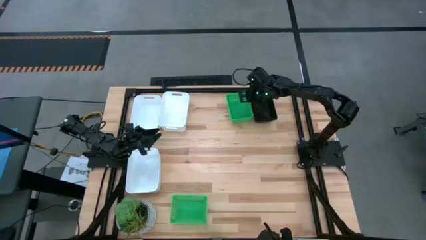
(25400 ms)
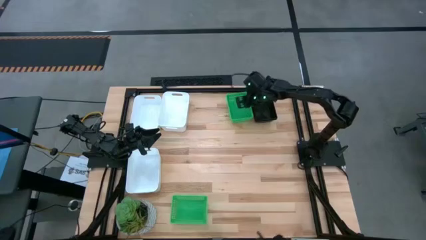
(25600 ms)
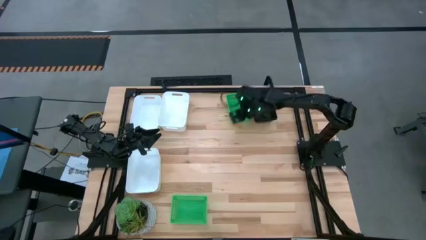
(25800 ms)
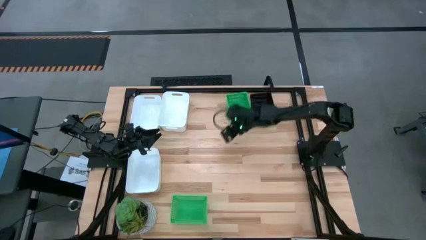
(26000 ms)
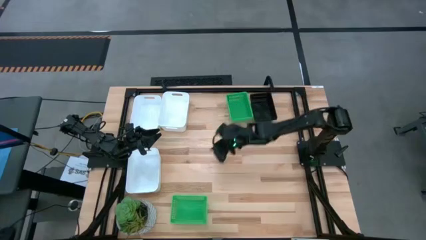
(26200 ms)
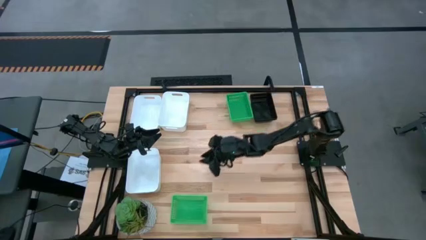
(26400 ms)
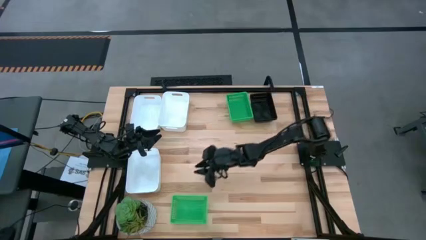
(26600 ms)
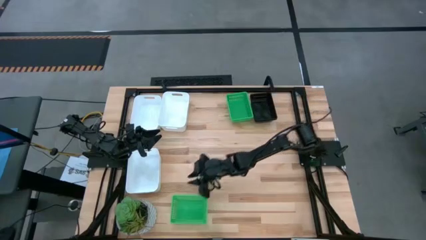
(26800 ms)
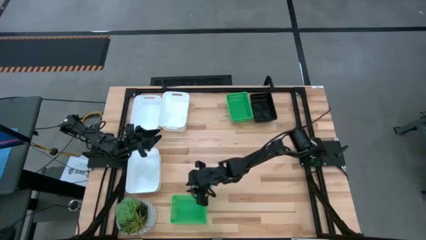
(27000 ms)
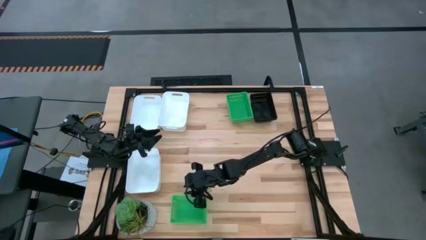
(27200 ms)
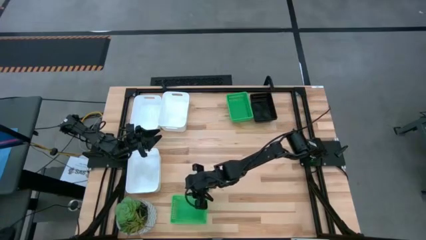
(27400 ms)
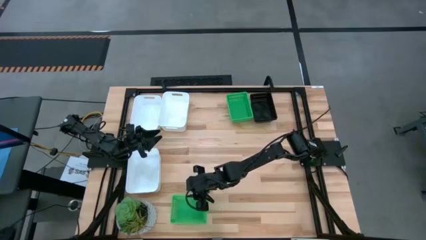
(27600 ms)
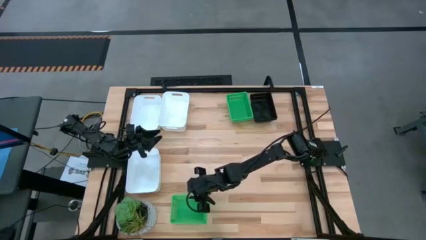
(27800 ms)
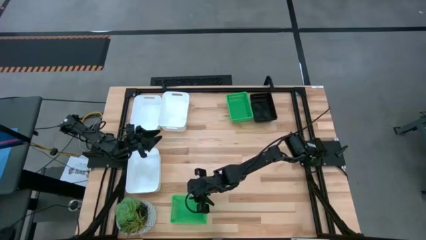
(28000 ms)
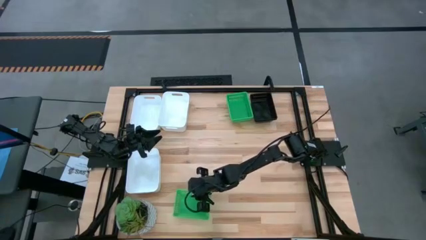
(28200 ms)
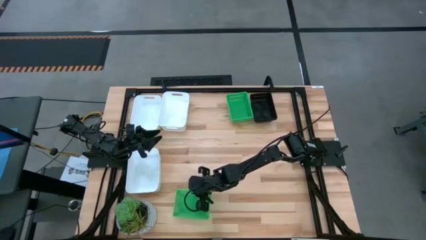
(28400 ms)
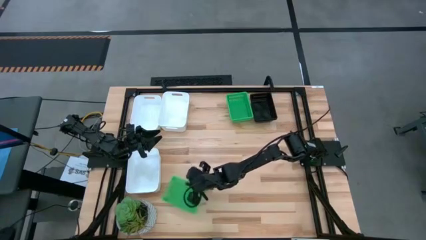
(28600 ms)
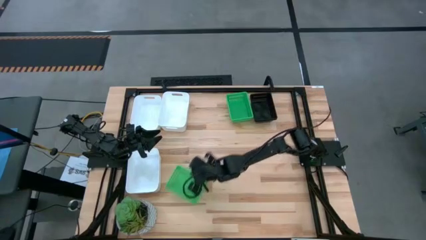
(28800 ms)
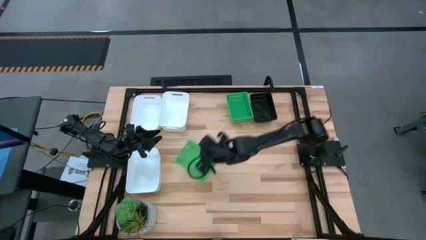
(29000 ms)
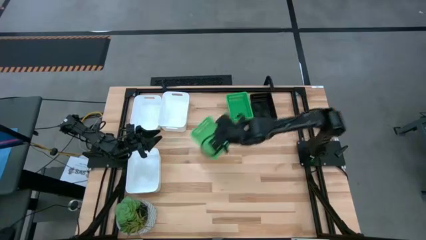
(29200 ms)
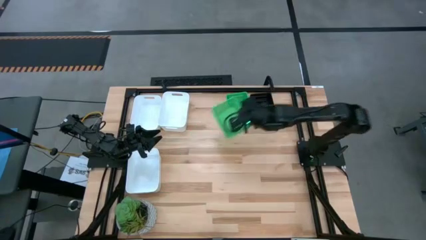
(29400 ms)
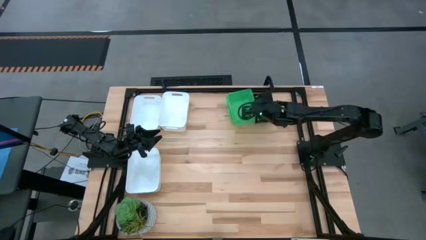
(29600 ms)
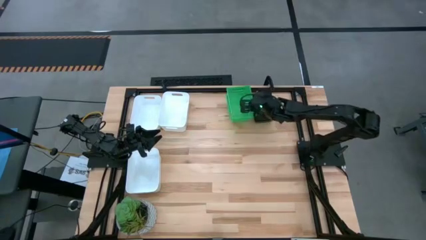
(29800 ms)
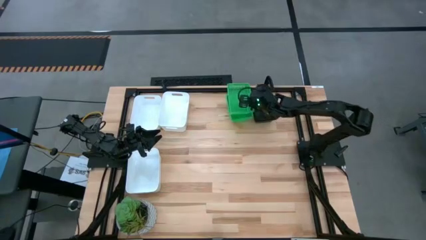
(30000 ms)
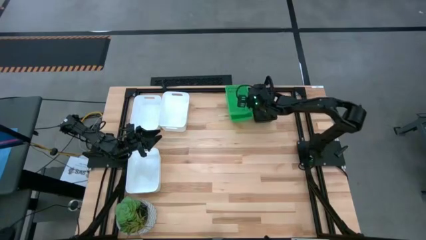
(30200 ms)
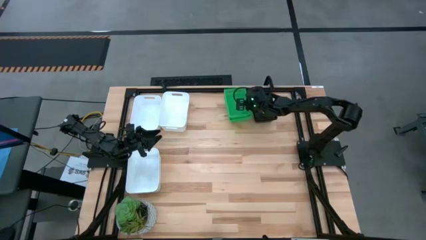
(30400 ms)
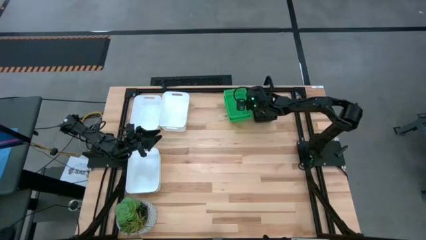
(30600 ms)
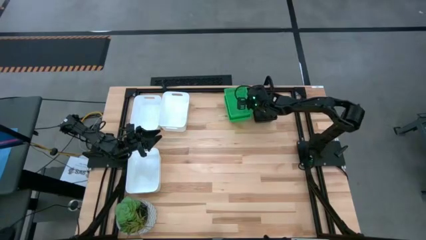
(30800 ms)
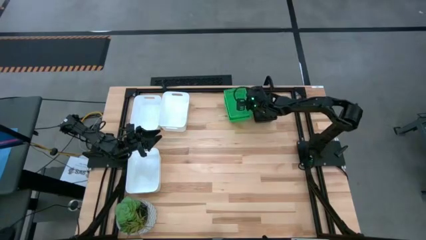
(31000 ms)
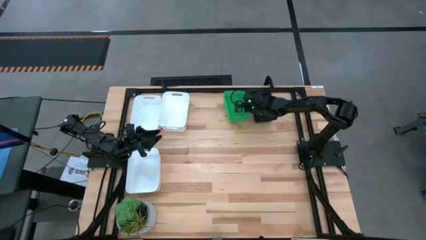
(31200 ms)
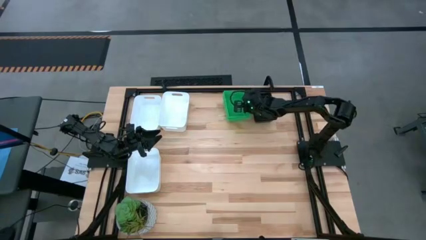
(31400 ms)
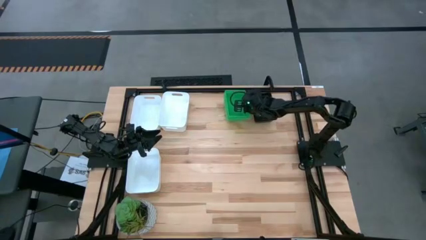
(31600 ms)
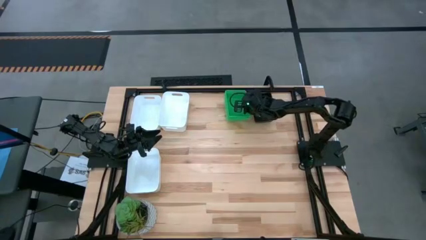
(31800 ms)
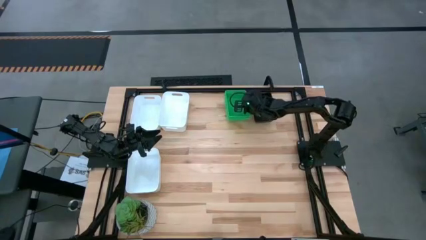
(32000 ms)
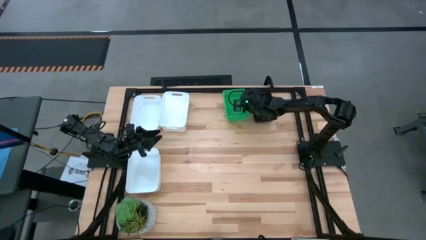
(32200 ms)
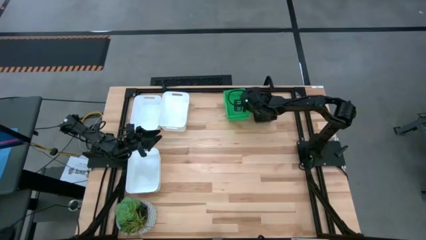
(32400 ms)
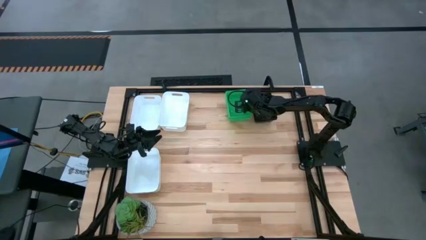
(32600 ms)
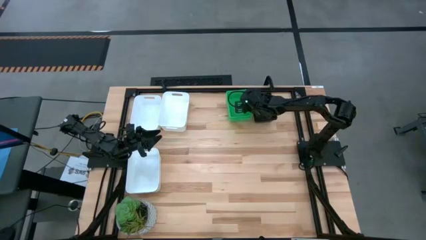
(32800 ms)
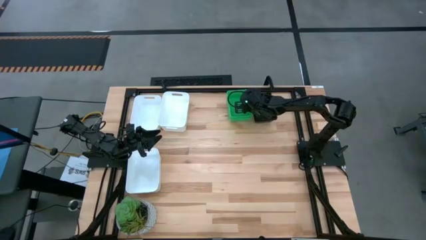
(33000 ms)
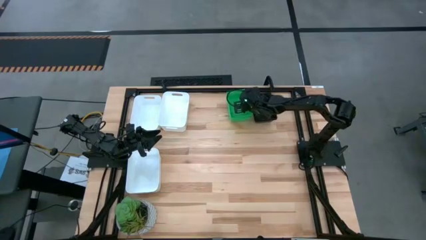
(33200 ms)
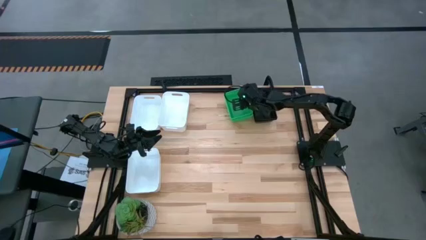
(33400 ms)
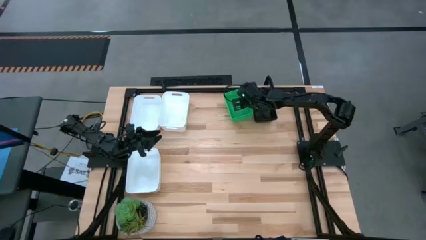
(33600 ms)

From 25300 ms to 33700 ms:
Stack the bottom green bin into the top green bin

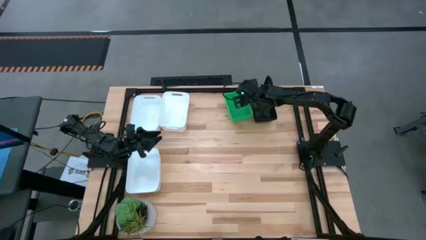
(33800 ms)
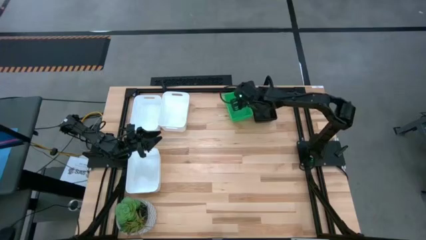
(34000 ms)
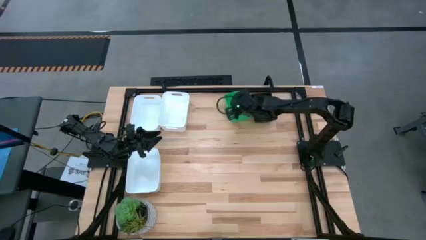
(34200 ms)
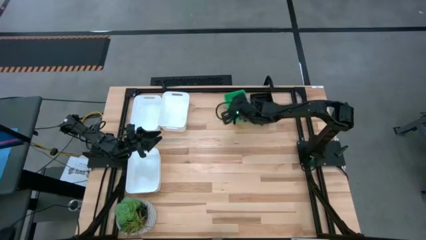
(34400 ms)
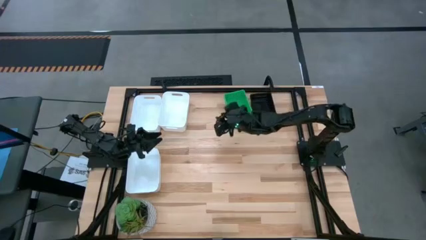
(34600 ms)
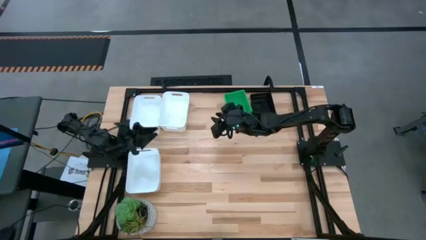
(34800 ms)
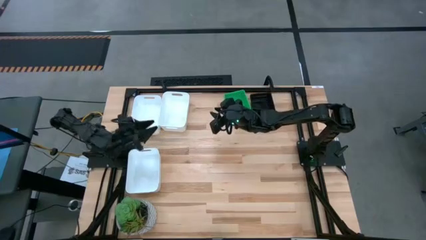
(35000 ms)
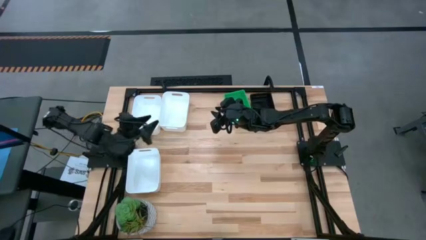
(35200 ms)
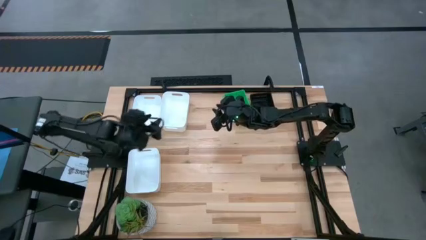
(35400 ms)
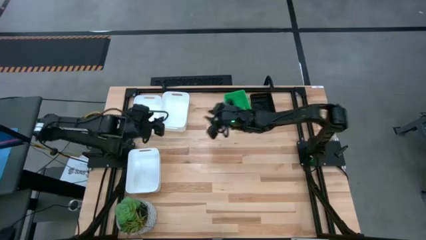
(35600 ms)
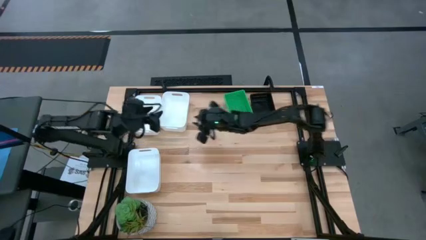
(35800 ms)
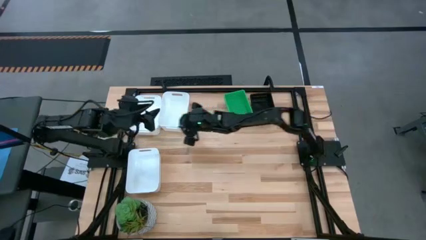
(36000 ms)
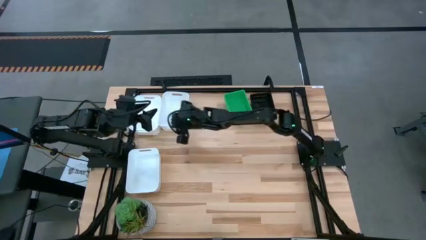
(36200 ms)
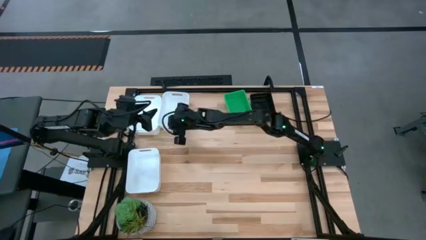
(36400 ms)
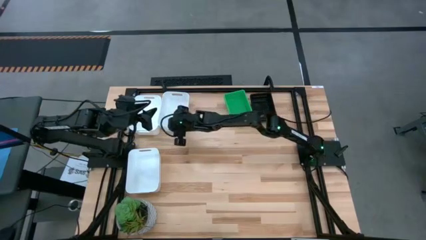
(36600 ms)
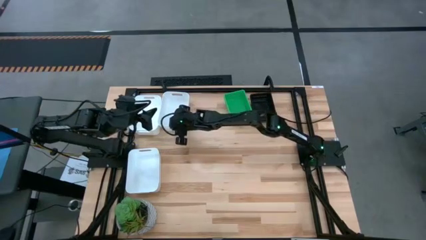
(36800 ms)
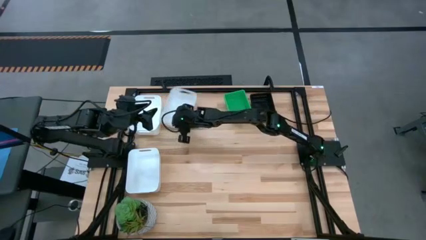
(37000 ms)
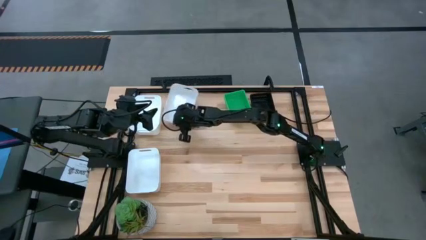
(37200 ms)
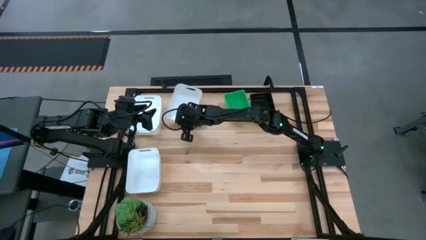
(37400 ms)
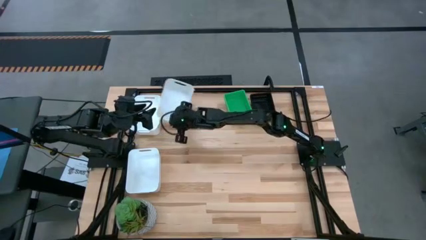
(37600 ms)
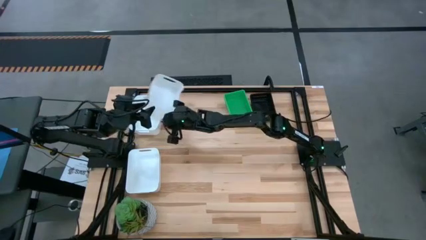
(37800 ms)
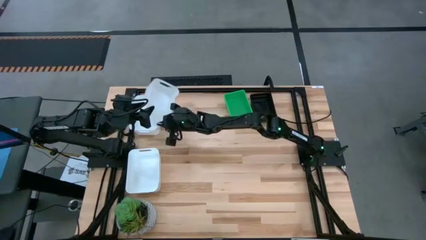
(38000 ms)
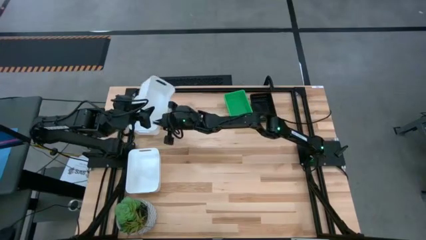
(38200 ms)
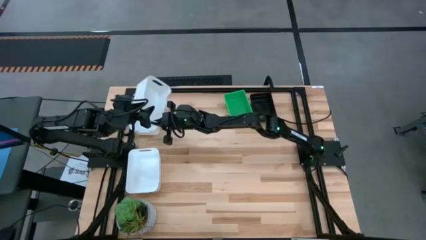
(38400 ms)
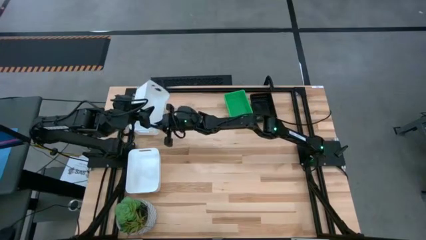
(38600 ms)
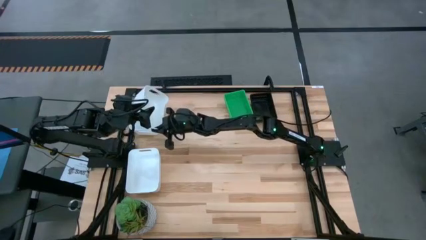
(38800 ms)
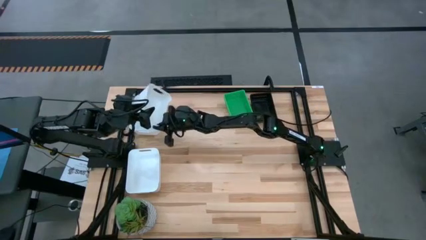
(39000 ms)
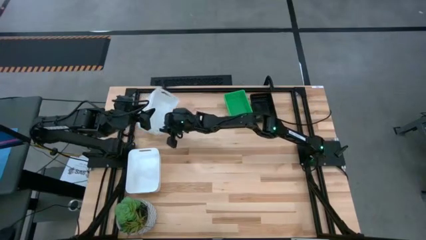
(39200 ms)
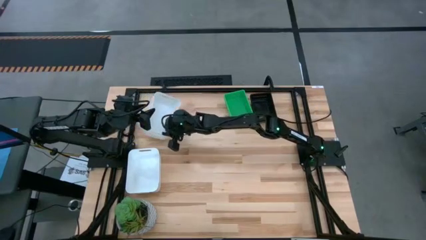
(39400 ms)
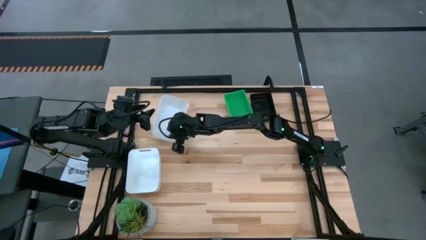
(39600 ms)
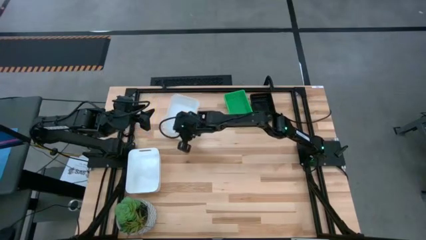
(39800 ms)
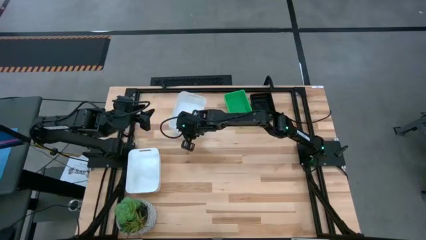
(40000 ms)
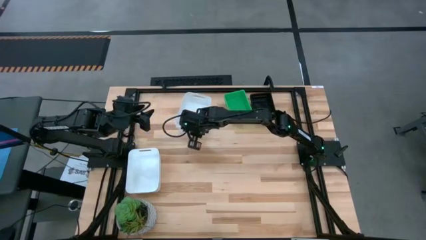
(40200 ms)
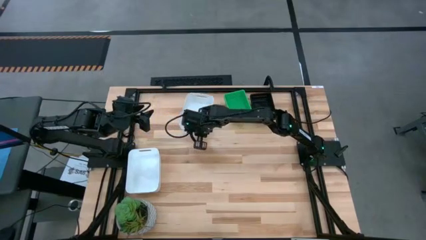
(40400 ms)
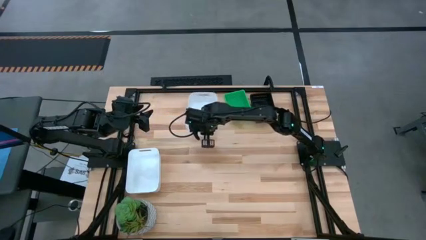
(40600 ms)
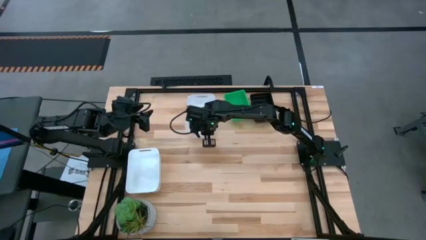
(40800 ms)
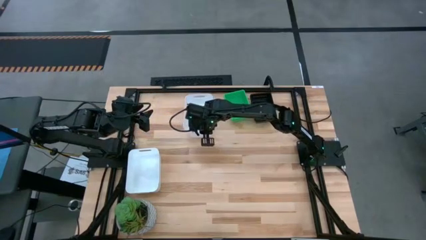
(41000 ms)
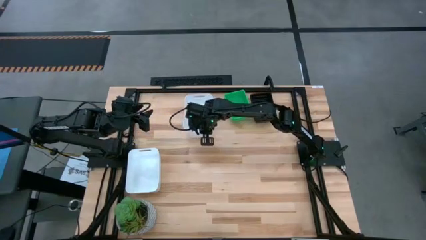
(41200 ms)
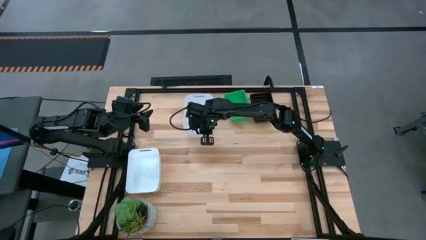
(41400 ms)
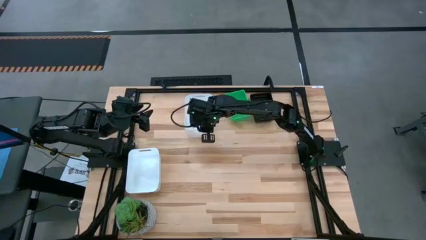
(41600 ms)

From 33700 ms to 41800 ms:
Stack the right white bin into the top left white bin

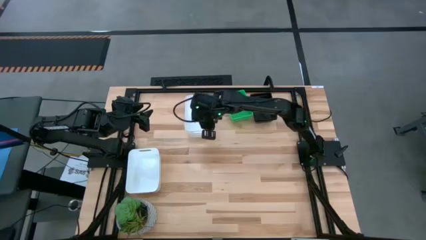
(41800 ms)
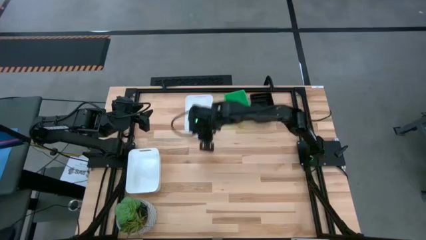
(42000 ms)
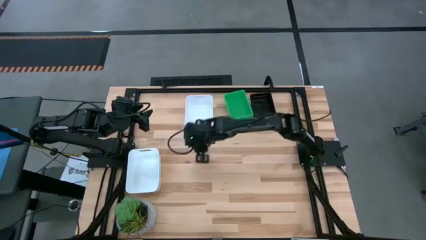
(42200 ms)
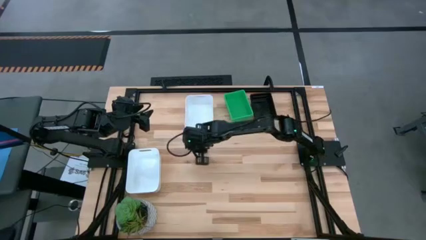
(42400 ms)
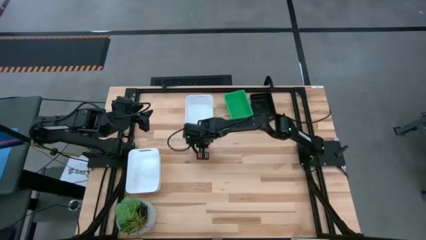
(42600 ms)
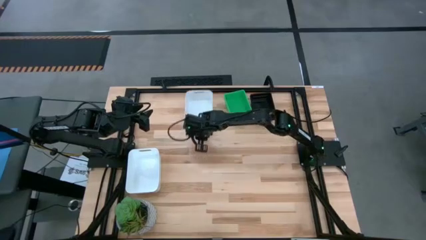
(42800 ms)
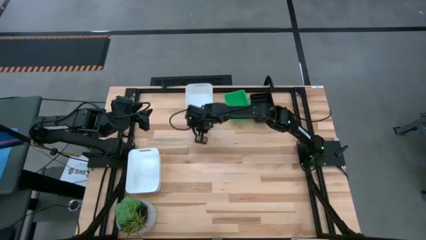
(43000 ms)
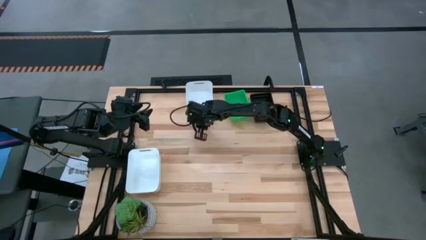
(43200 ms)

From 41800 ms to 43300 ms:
Adjust the white stacked bins
